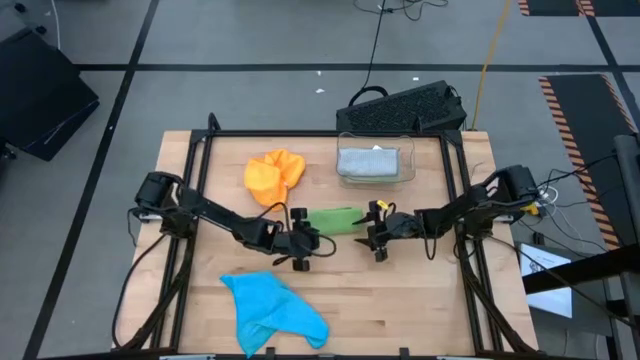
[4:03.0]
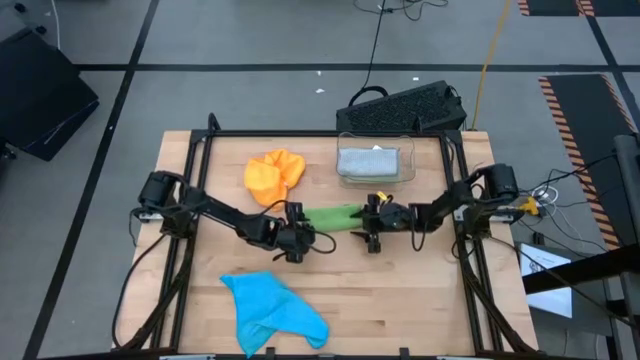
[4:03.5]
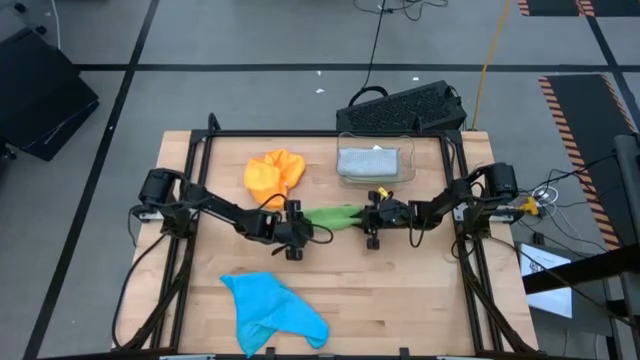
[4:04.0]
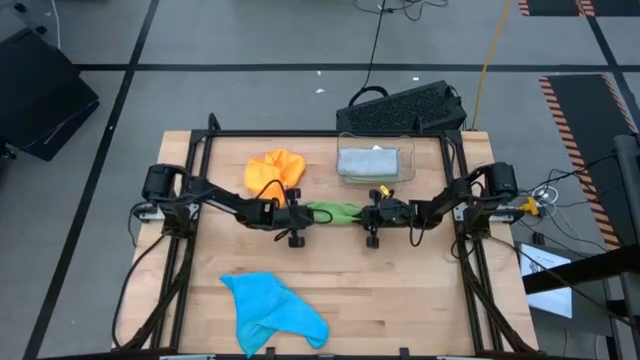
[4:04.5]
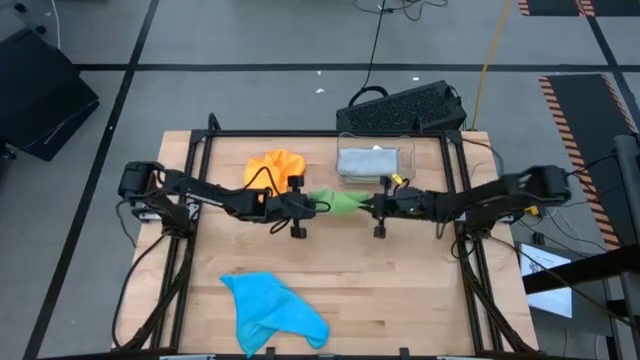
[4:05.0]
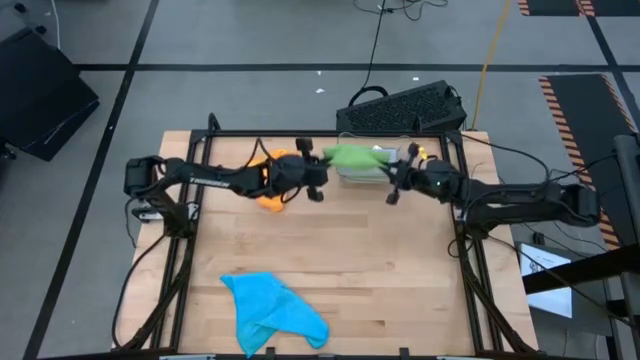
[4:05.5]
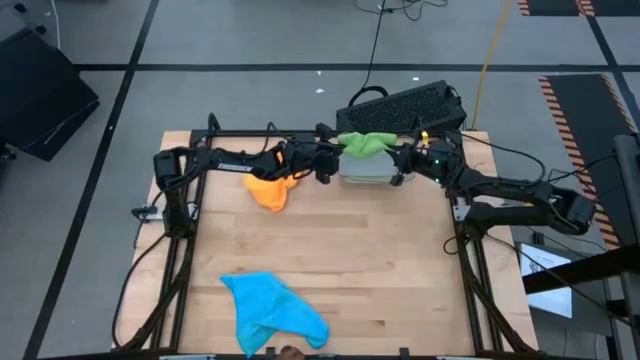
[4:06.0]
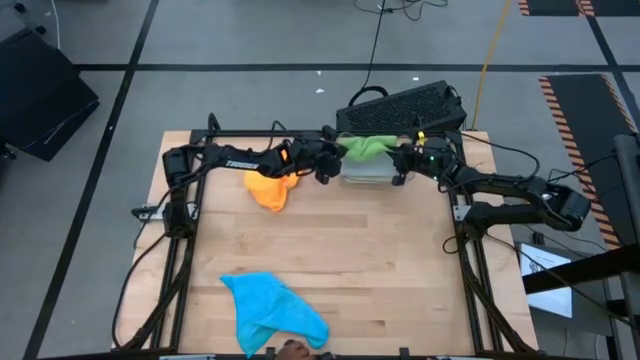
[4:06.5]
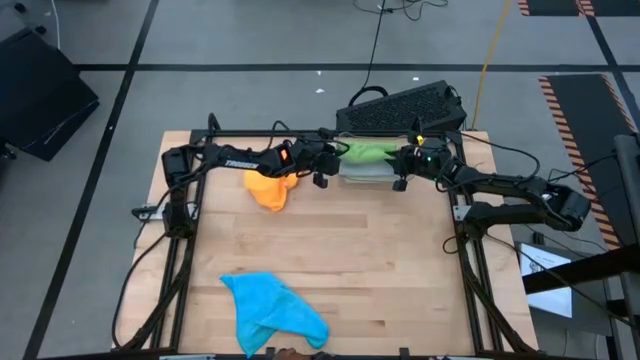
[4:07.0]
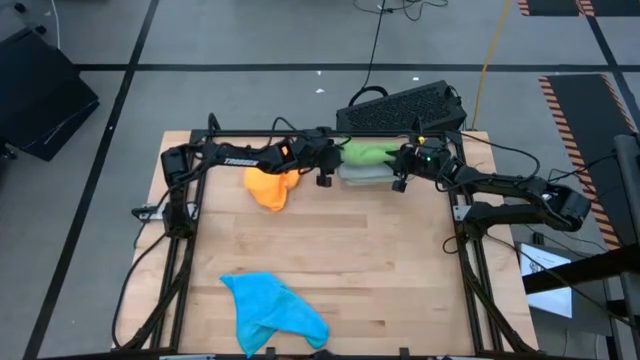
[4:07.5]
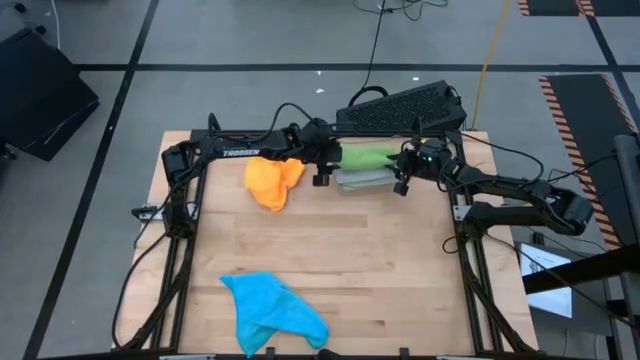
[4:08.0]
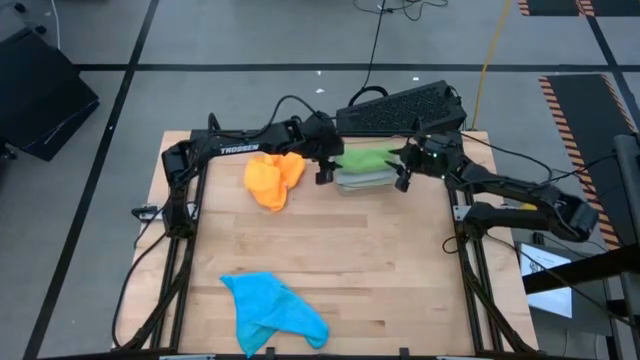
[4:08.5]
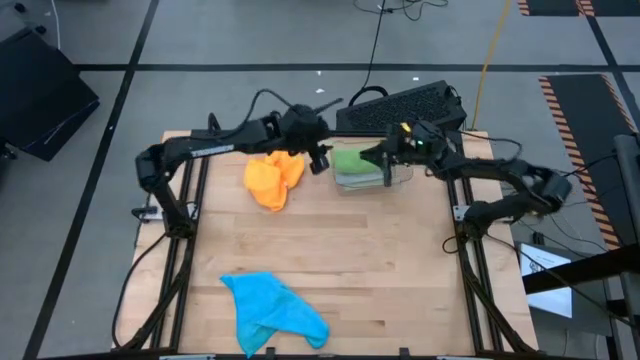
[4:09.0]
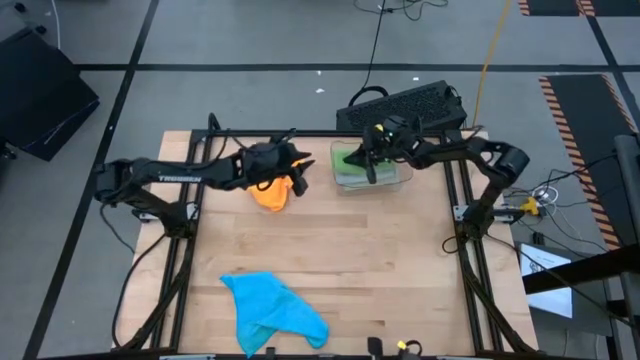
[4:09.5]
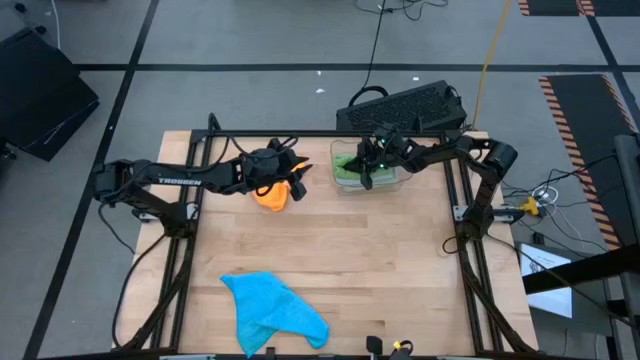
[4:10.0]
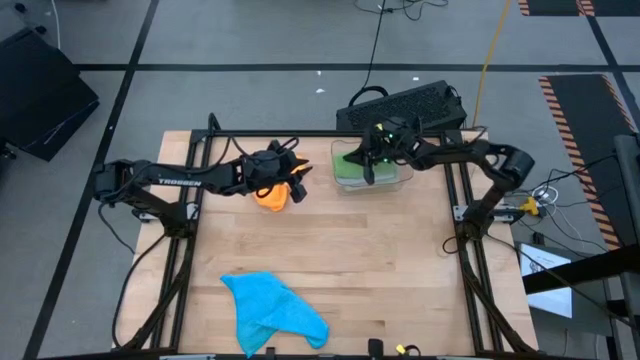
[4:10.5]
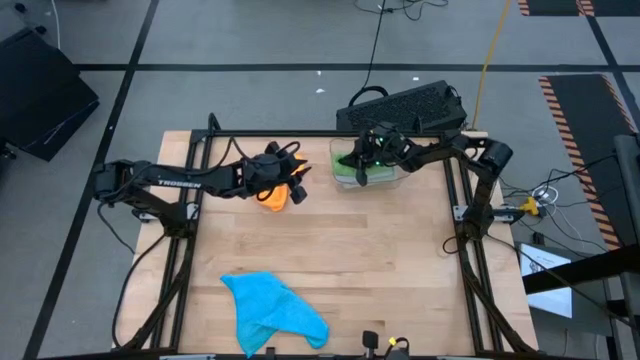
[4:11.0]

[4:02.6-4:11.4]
Task: Fold microfiber towels
Put the folded green microfiber towel into the transparent bin

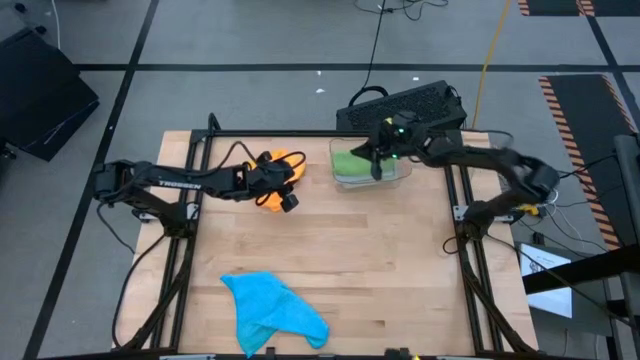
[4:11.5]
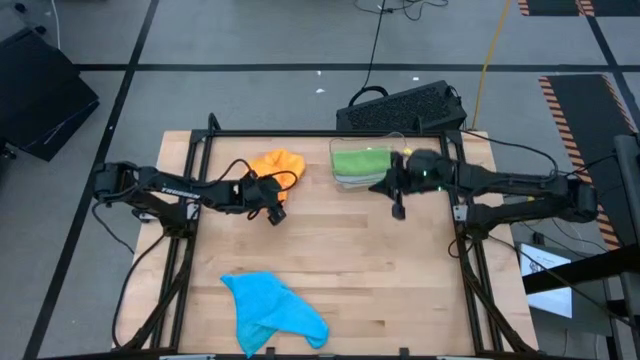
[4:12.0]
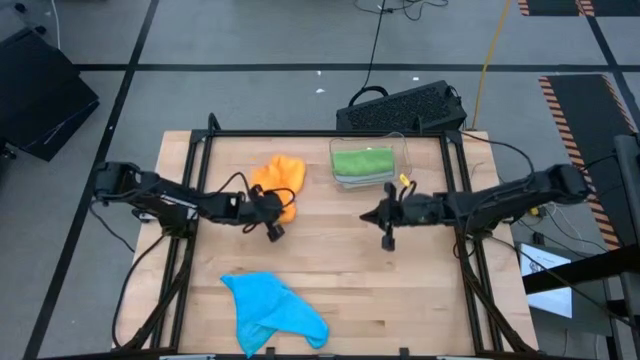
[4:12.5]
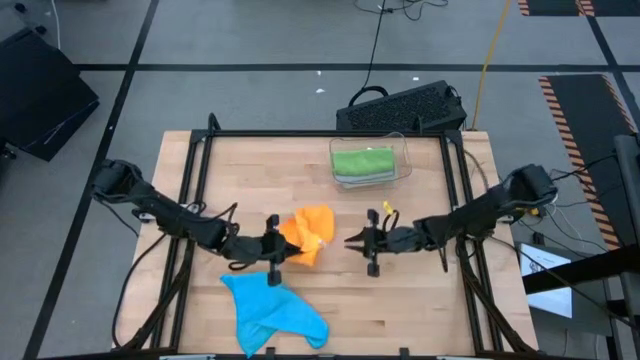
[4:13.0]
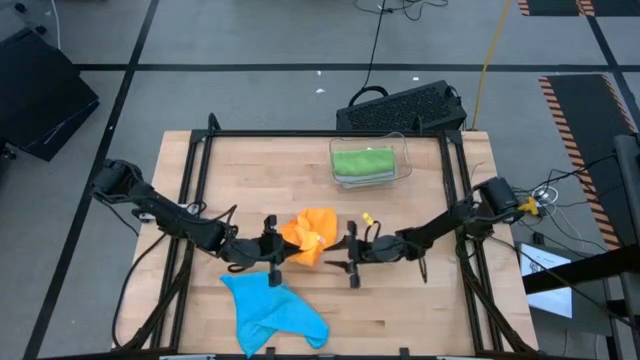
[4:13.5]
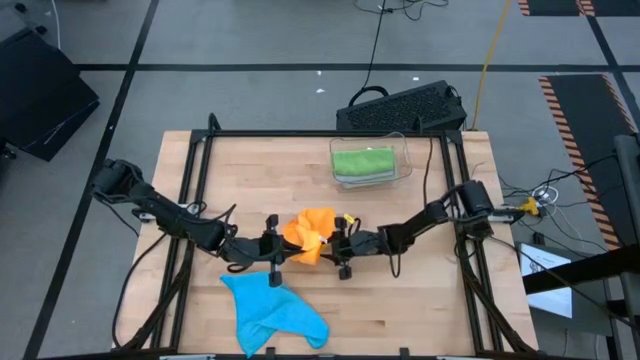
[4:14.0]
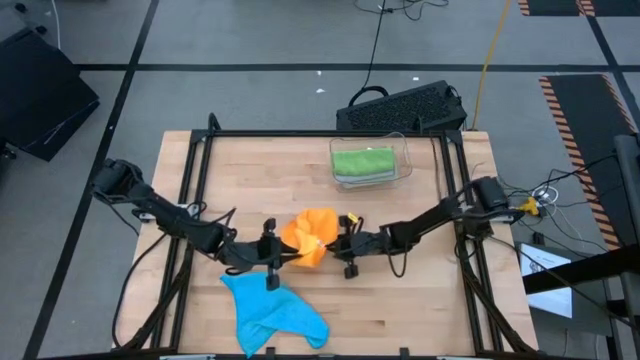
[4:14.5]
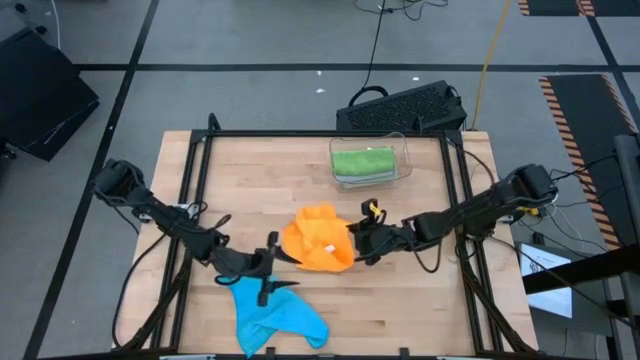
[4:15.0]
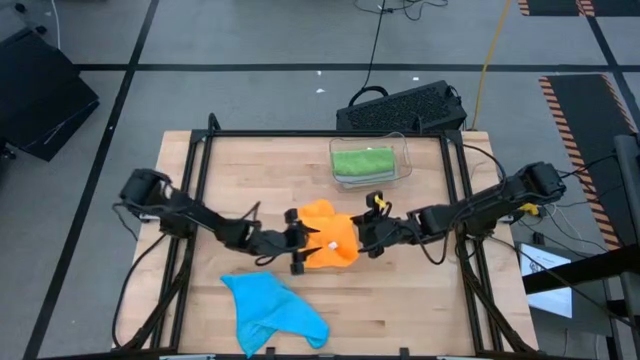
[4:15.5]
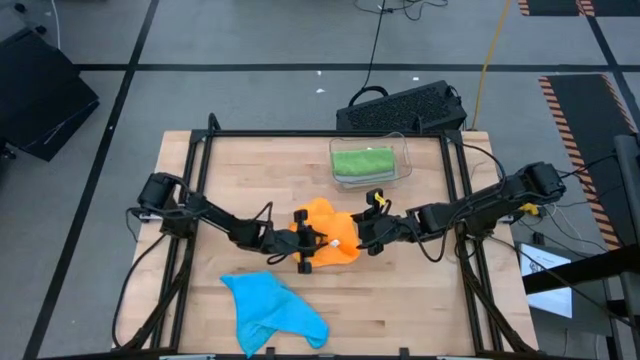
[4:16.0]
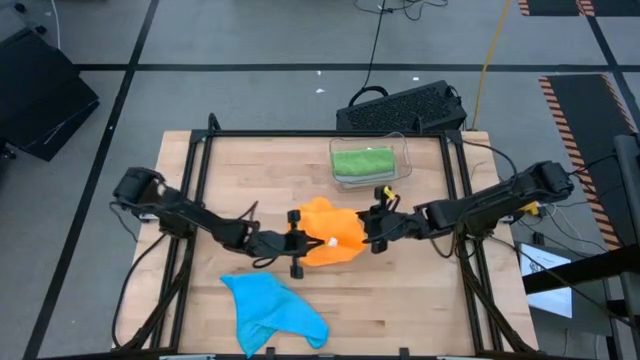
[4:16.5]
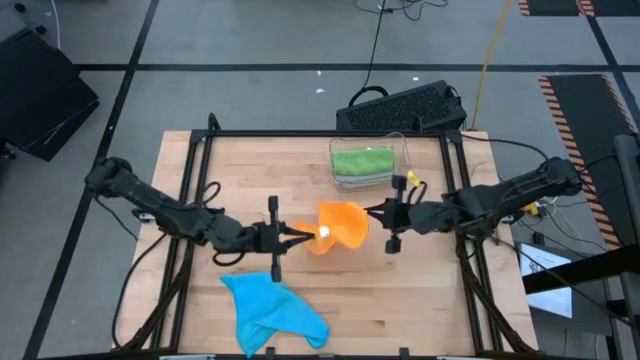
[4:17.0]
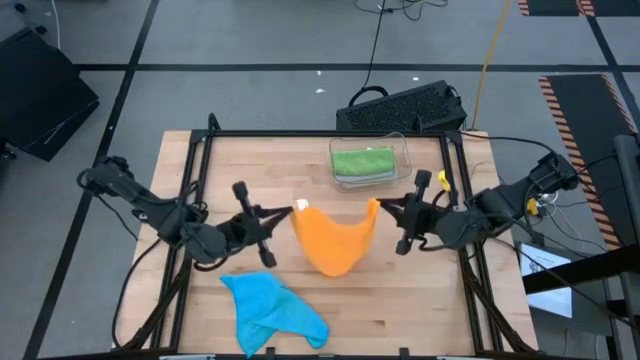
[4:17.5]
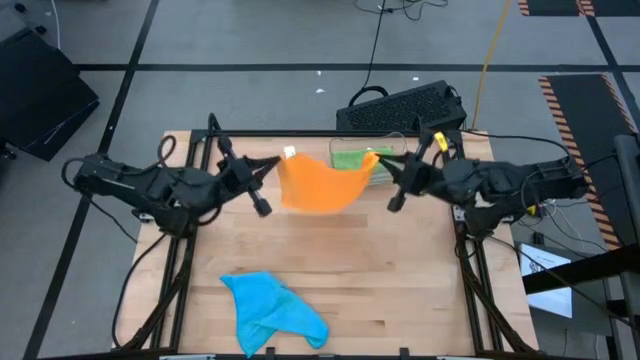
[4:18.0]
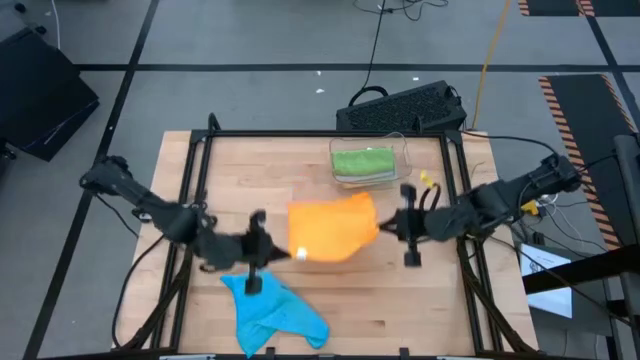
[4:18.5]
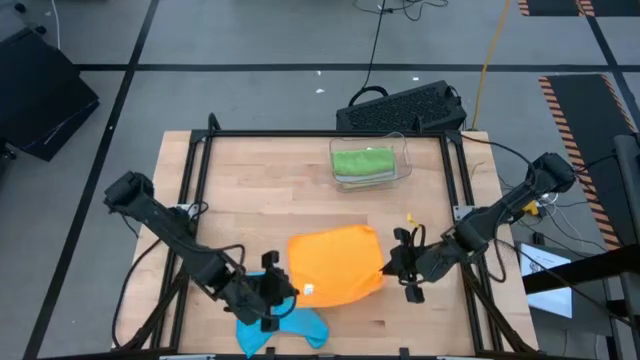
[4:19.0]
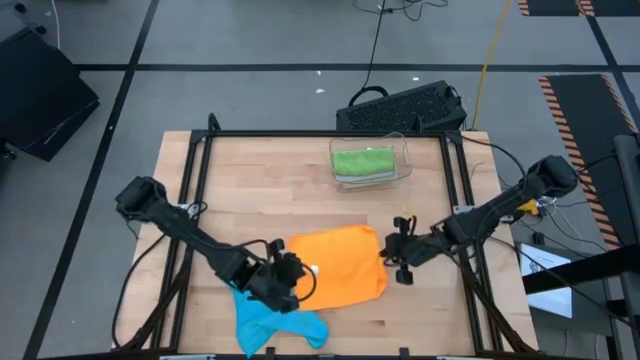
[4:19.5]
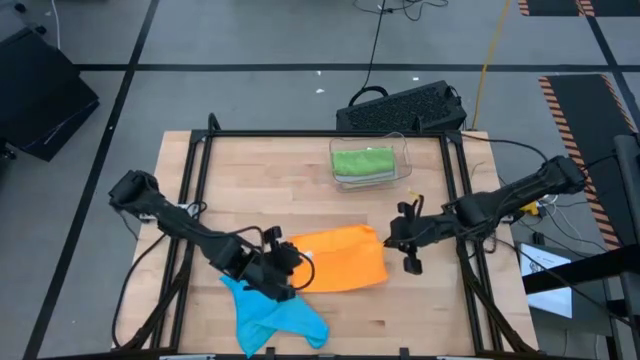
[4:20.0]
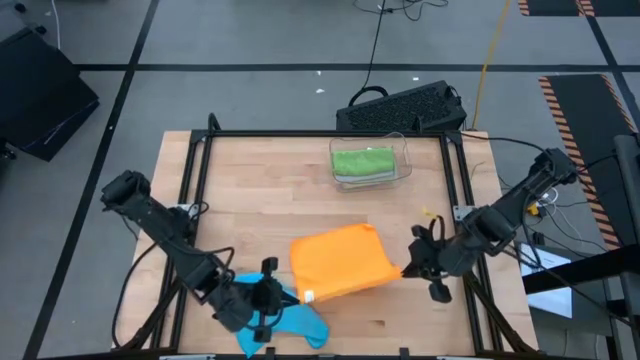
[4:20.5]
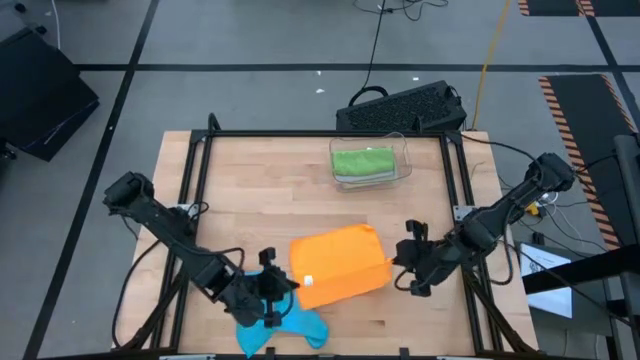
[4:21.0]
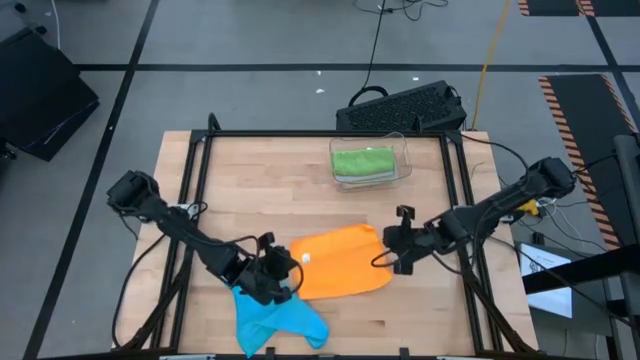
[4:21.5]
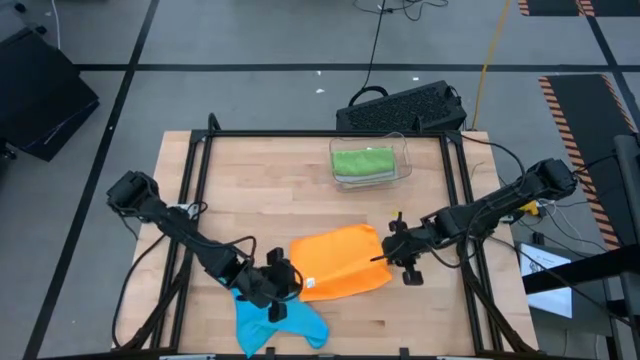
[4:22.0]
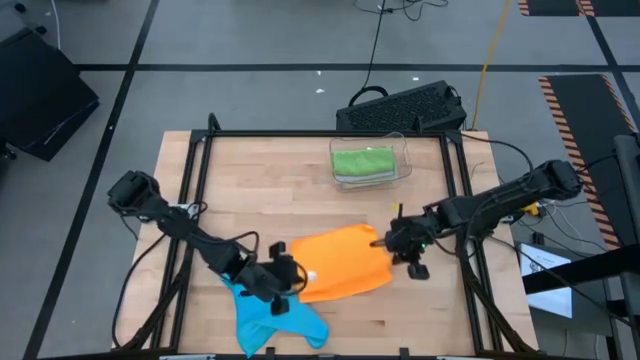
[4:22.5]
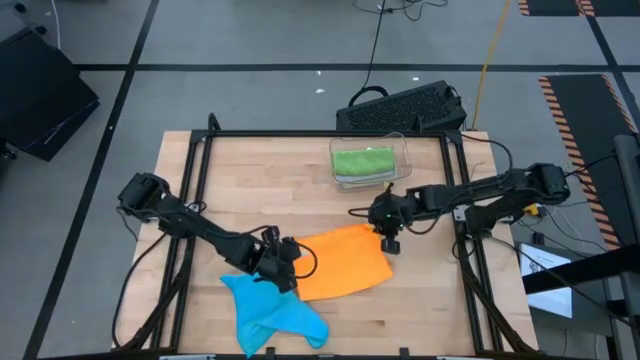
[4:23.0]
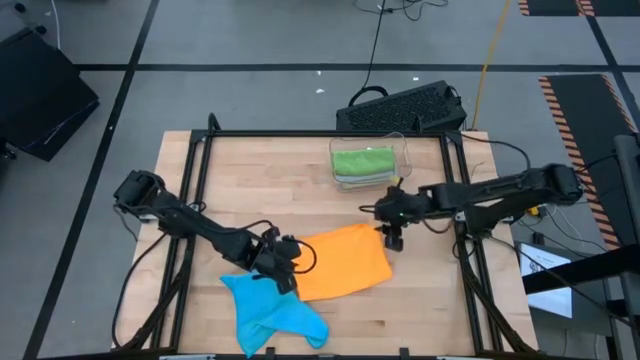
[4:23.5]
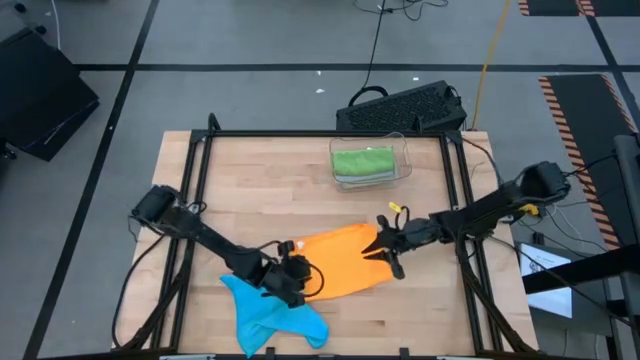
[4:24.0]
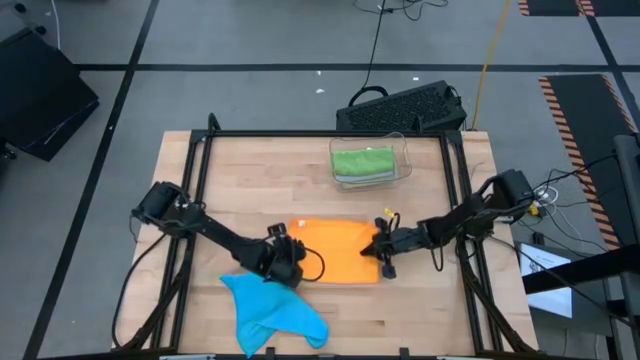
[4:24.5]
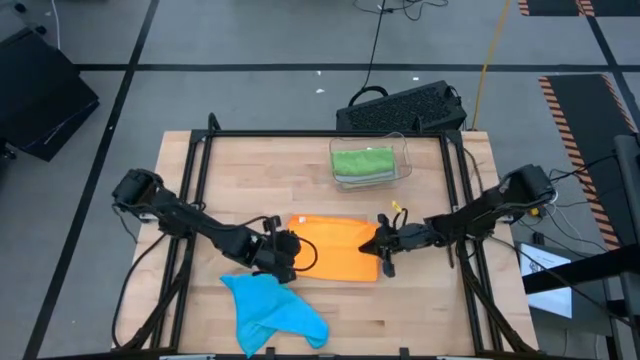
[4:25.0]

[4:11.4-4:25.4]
Fold the orange microfiber towel
